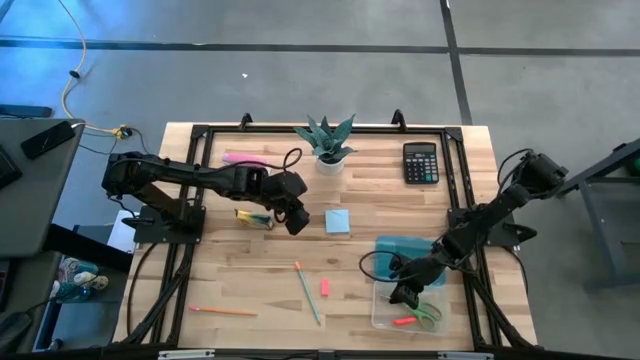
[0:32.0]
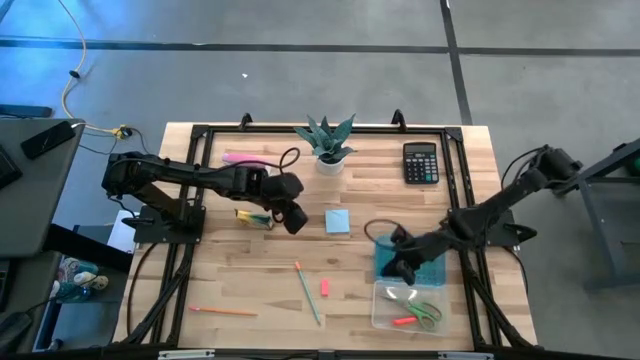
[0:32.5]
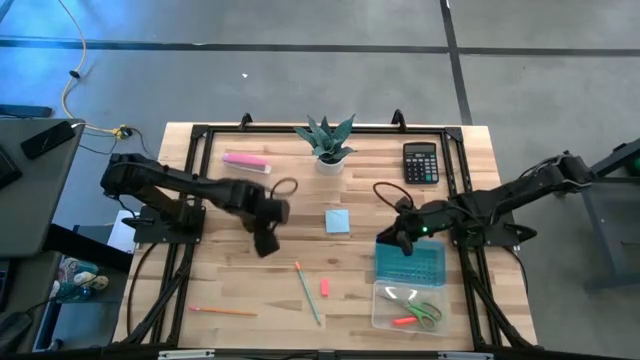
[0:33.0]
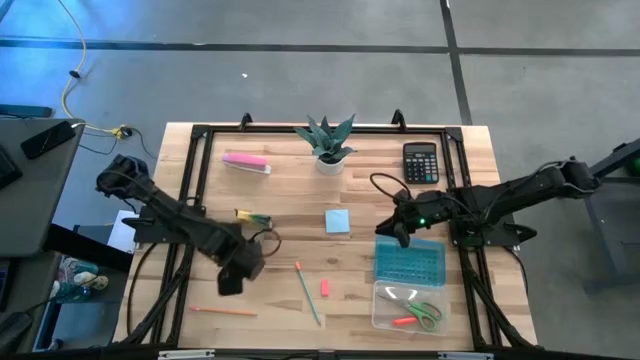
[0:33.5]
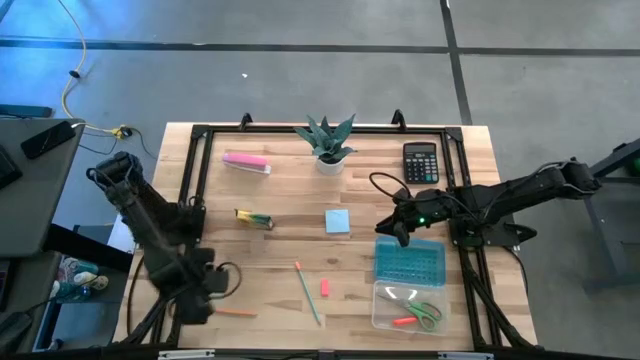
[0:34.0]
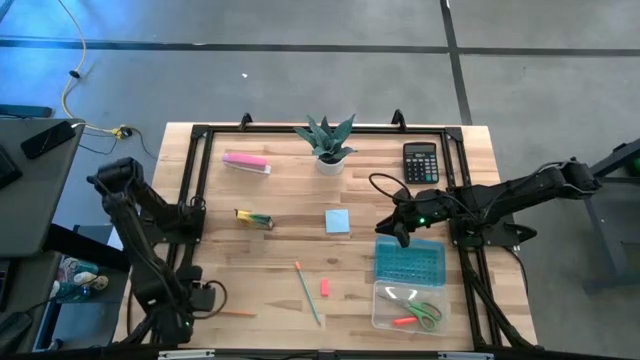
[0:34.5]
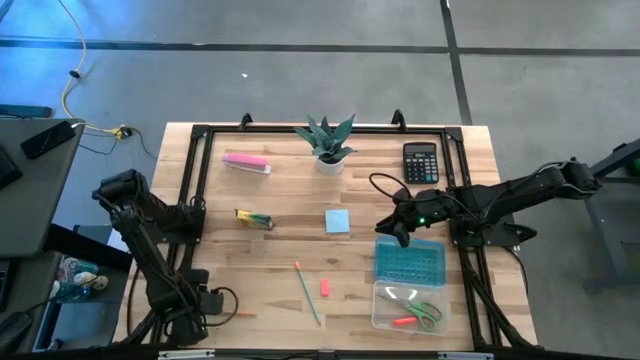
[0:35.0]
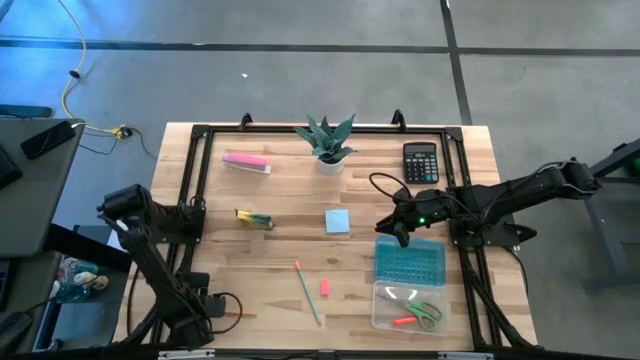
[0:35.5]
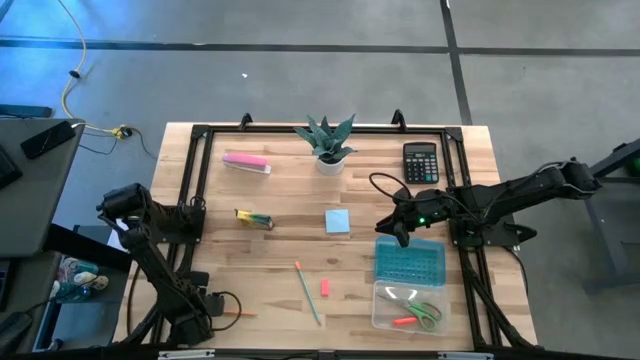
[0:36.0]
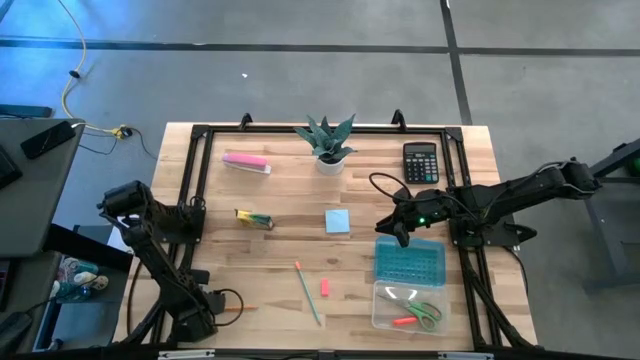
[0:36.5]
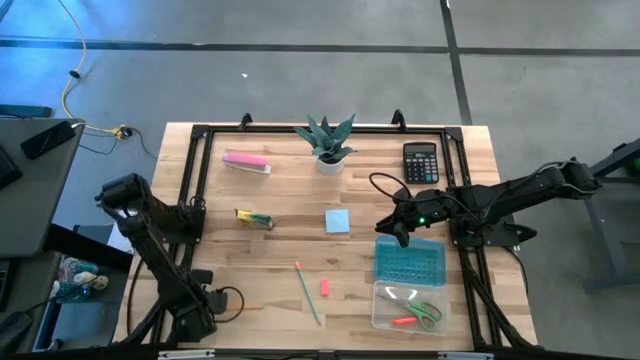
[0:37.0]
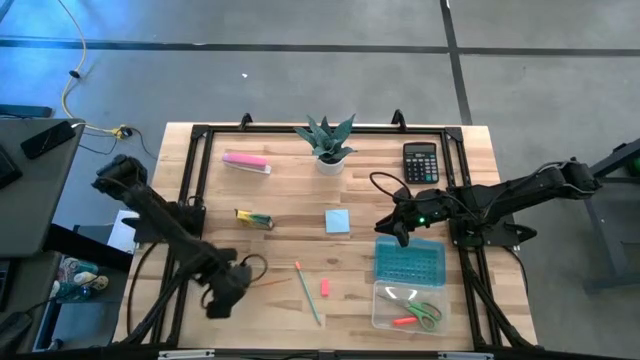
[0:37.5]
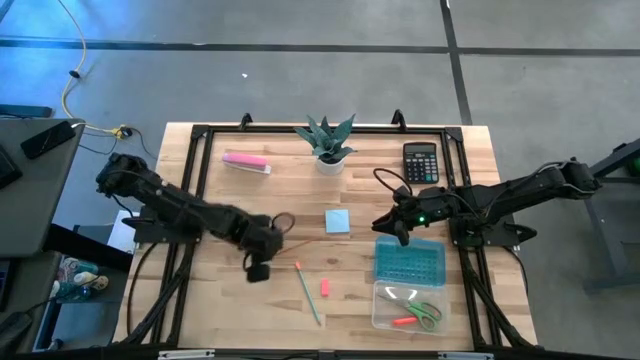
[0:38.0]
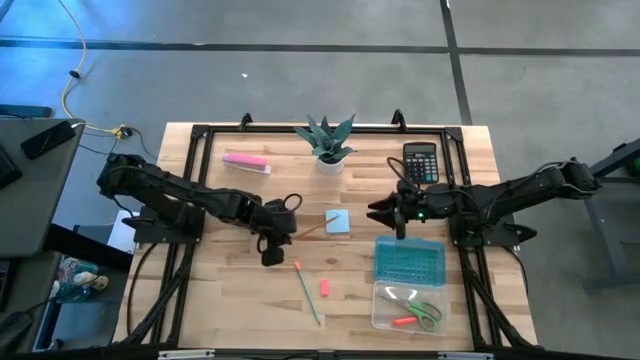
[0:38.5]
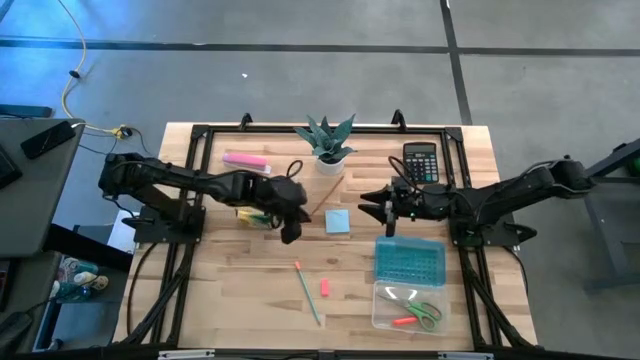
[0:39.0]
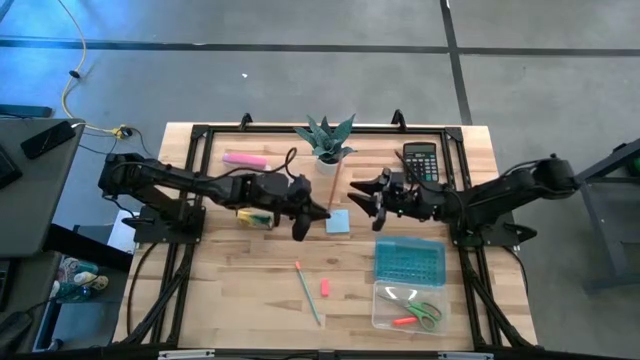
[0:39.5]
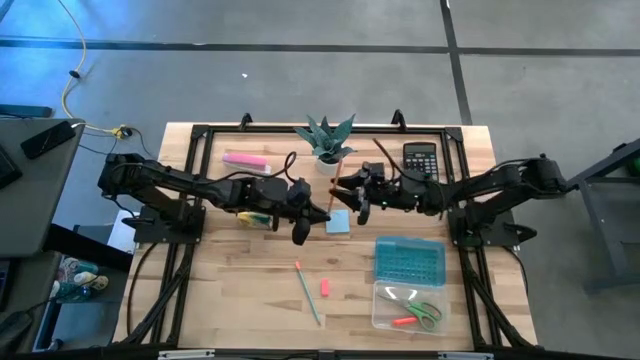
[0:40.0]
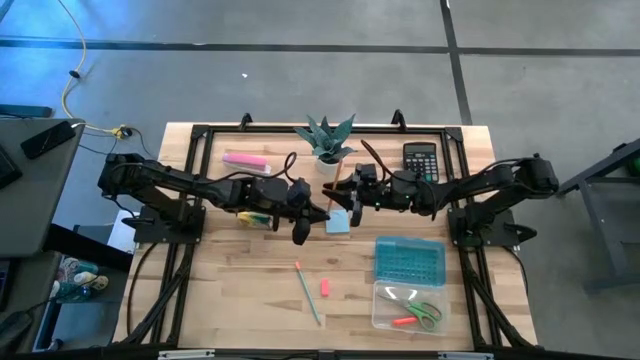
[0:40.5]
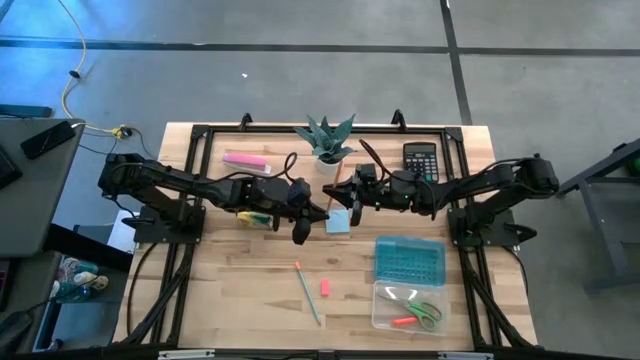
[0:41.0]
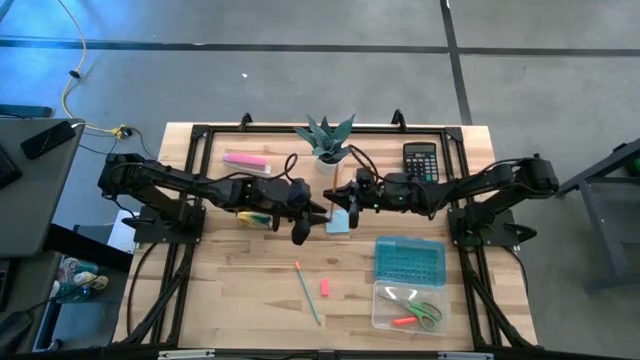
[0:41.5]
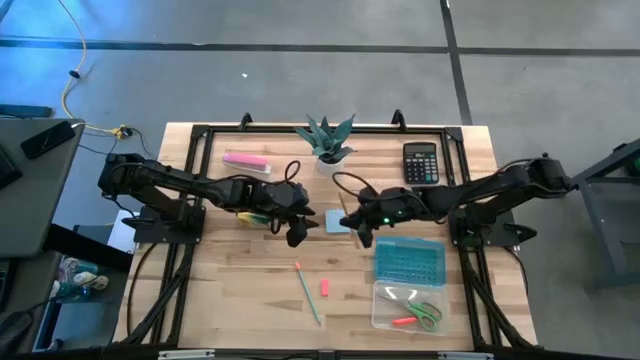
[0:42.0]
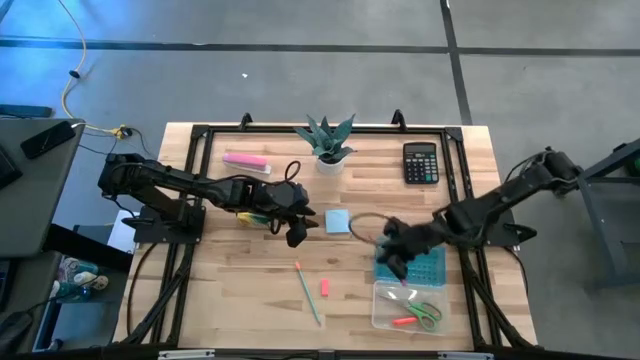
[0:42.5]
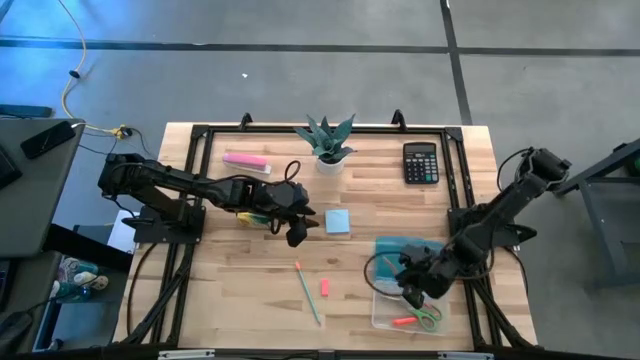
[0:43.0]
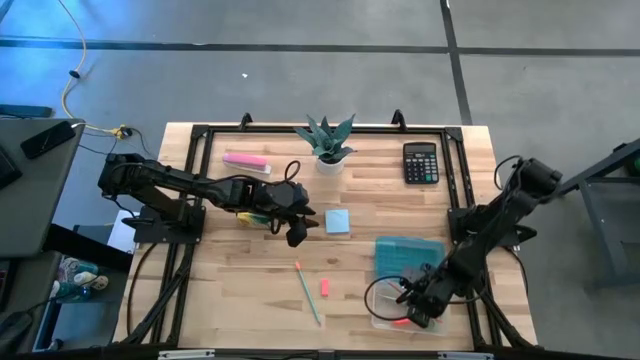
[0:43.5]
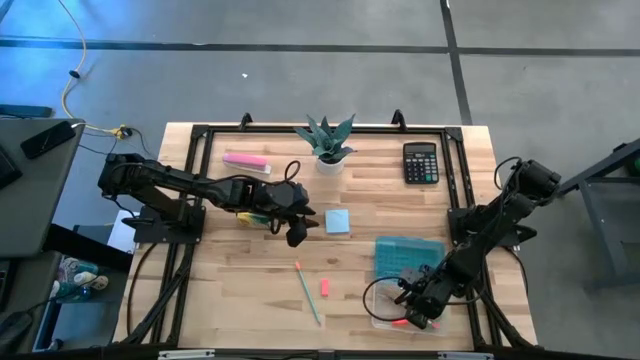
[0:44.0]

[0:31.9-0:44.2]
Task: Pack school essentials
Put the orange pencil into the blue supply box

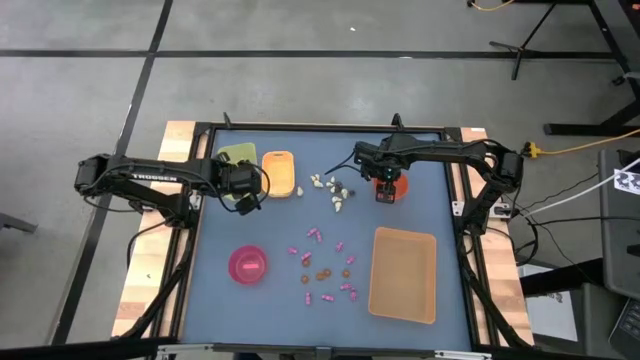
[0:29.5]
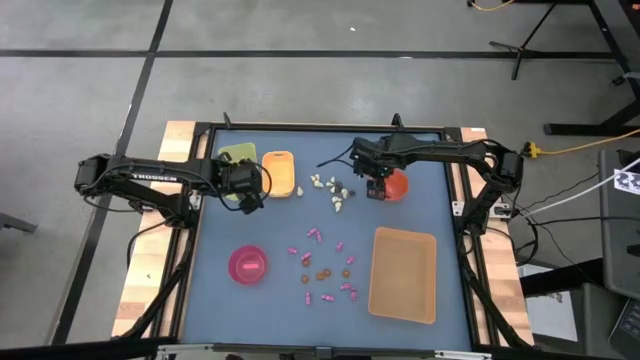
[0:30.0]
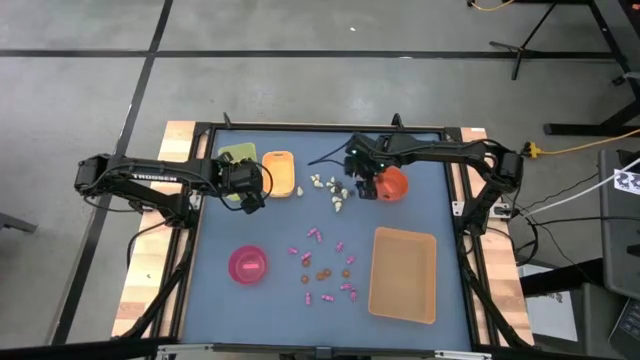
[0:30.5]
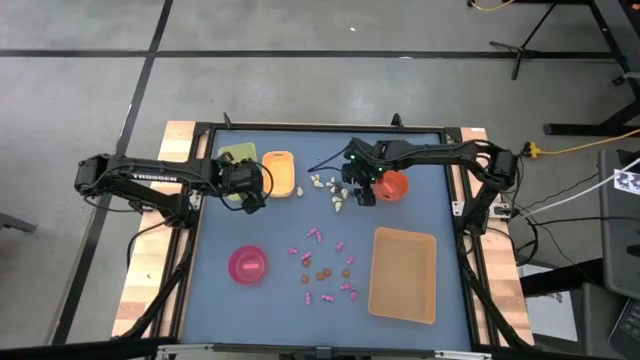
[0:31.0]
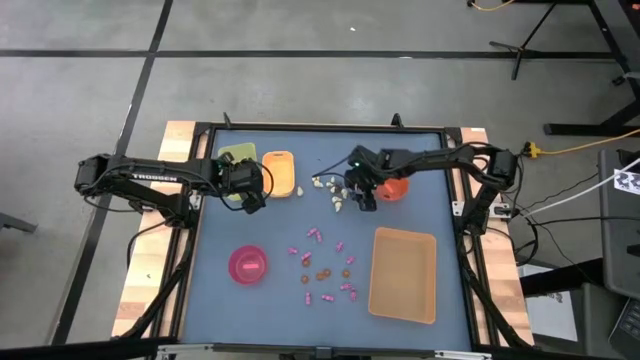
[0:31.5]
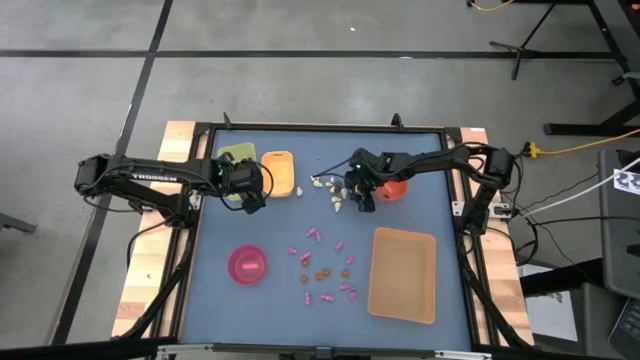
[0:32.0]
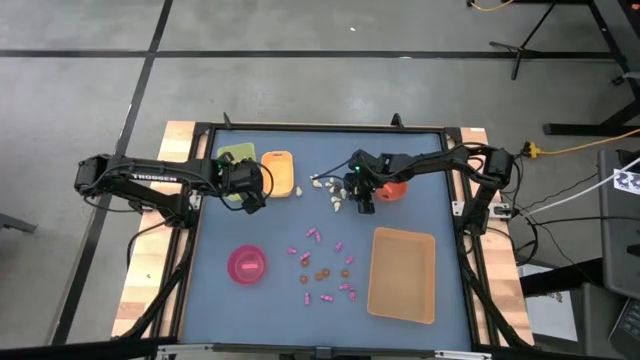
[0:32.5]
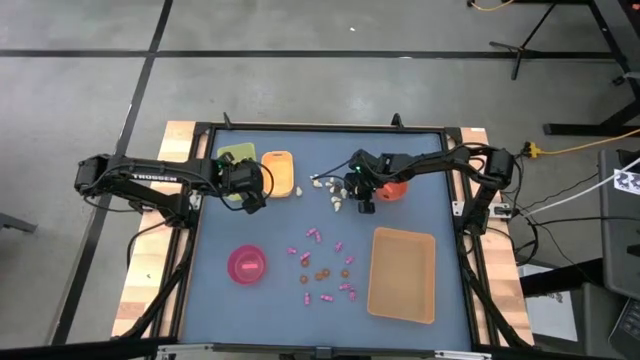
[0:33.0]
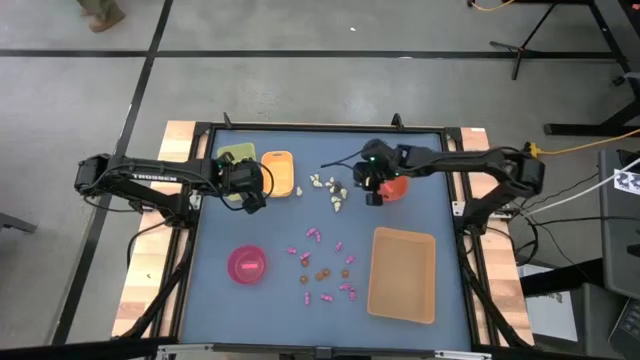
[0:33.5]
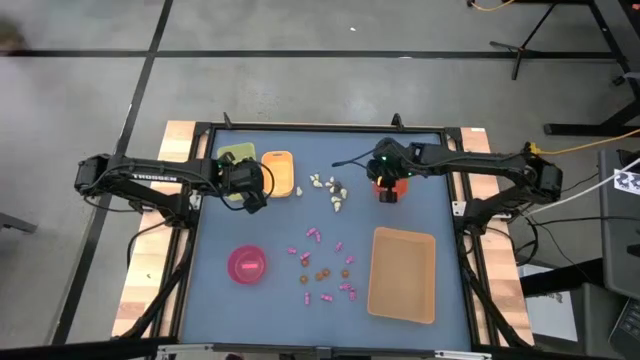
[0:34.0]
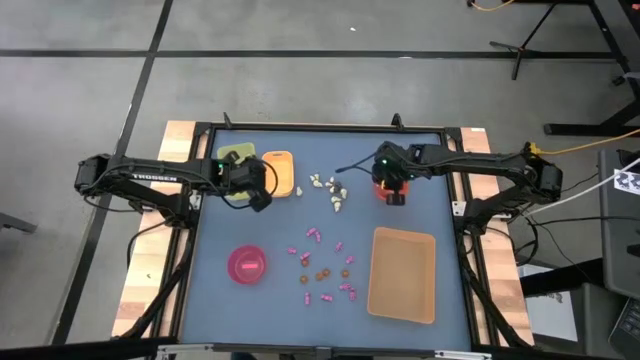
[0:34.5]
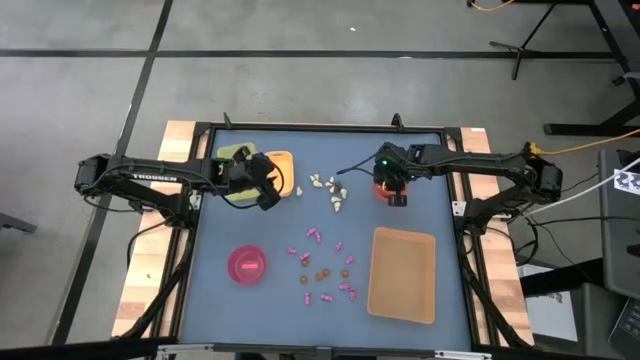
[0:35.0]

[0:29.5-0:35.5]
Task: Sort Halloween decoration
Put the black skull toy into the orange bowl

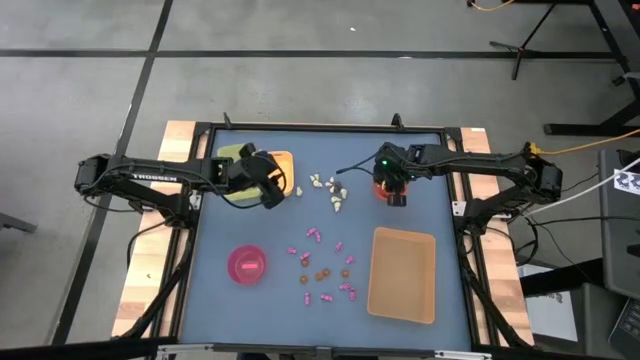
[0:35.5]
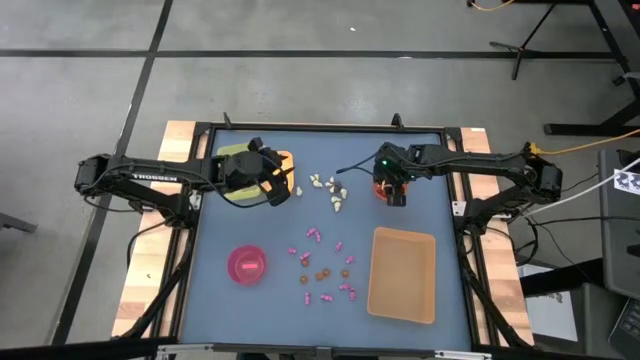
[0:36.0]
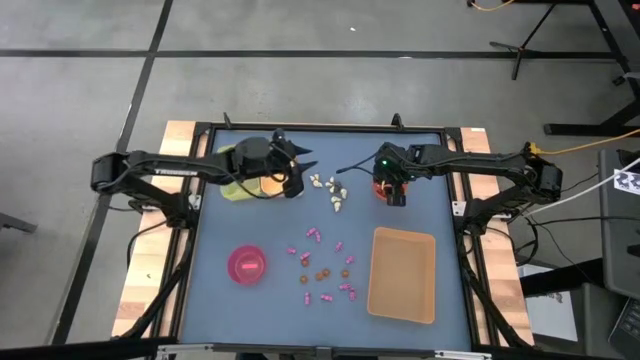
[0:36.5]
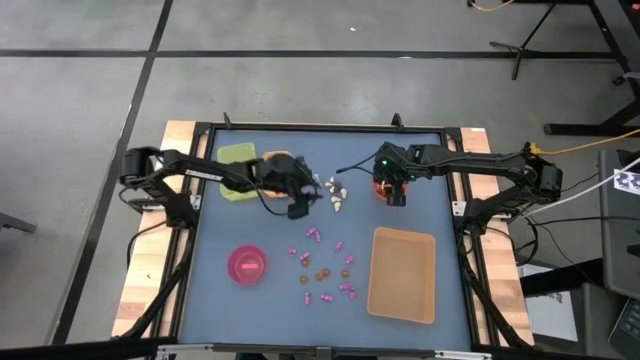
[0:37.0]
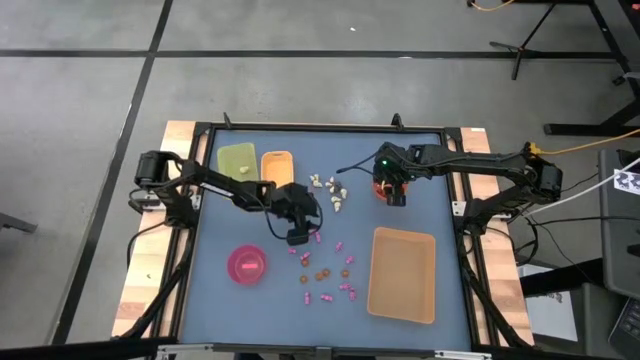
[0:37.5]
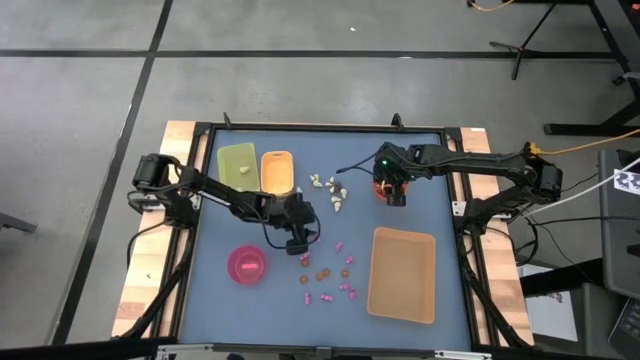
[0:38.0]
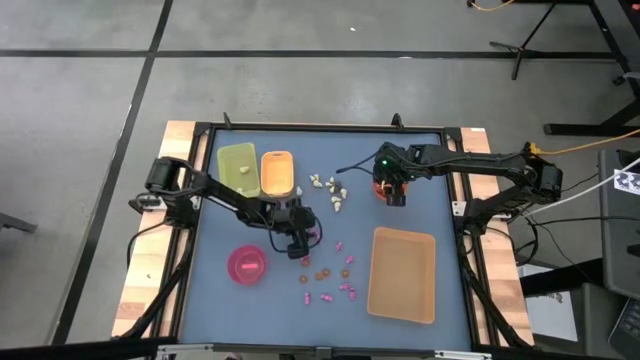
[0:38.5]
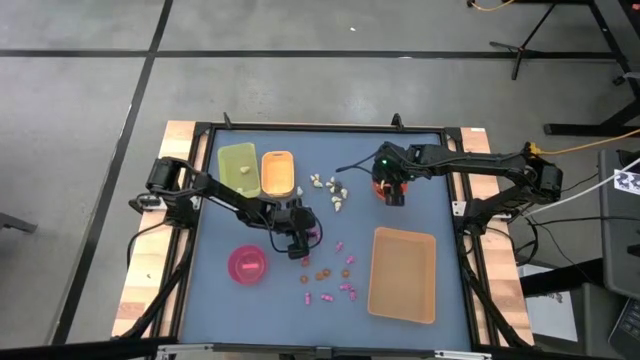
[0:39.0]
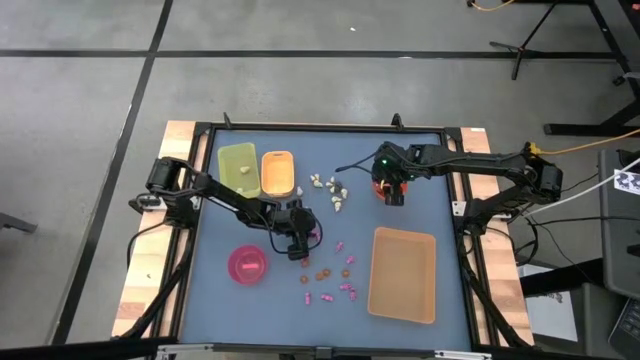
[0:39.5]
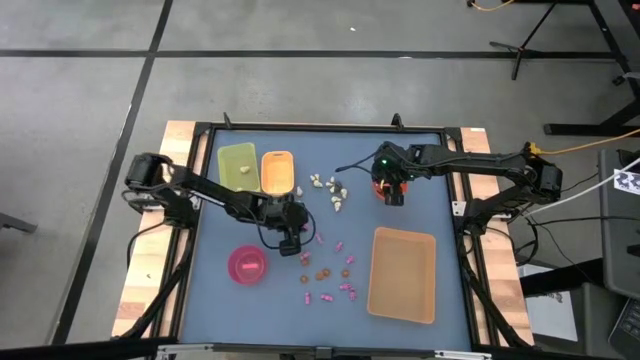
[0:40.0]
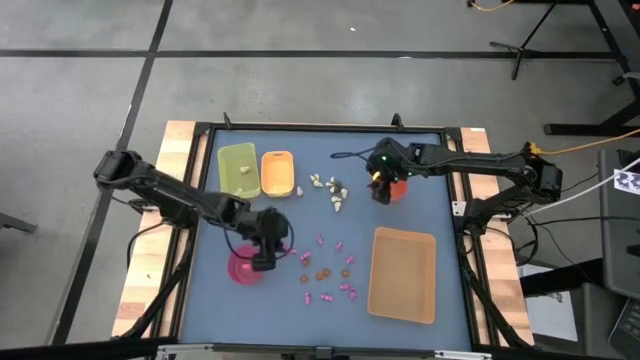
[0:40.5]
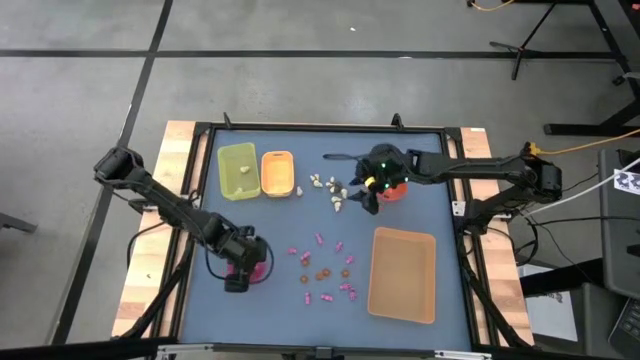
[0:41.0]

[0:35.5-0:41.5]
Put the pink skeleton toy into the red bowl
